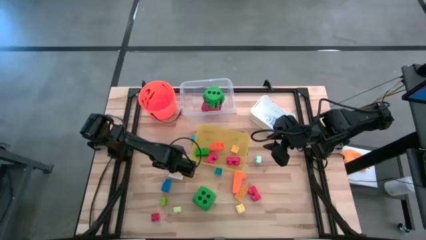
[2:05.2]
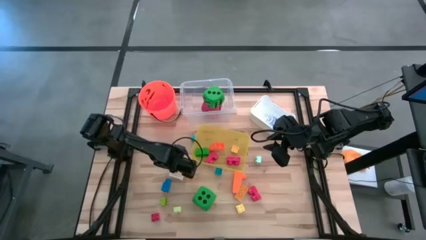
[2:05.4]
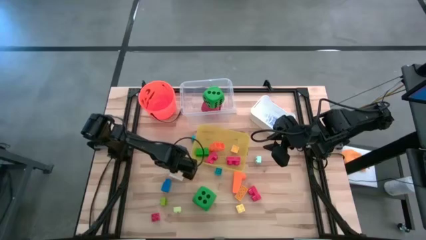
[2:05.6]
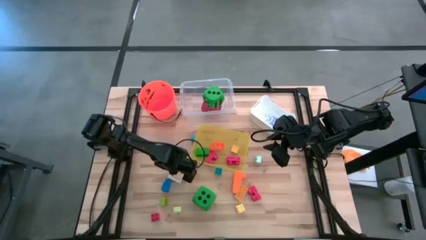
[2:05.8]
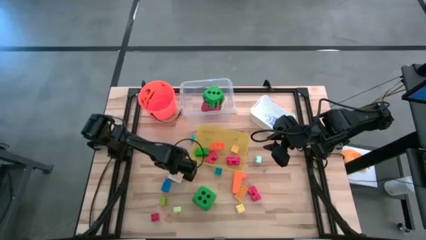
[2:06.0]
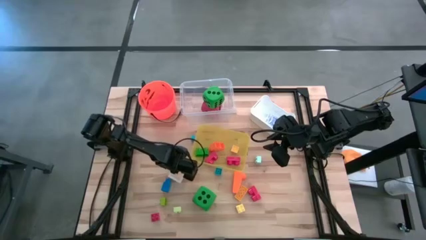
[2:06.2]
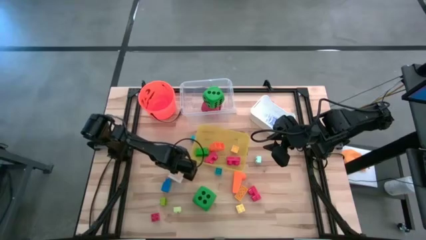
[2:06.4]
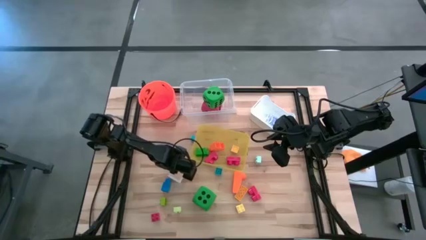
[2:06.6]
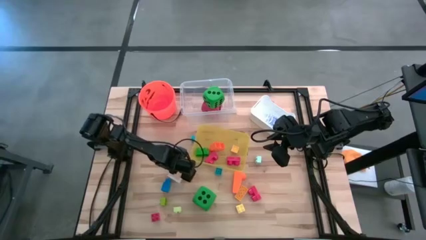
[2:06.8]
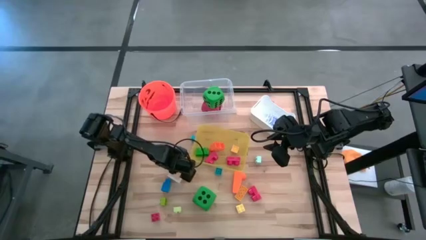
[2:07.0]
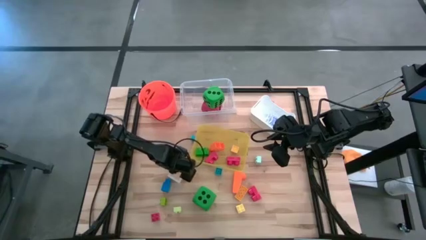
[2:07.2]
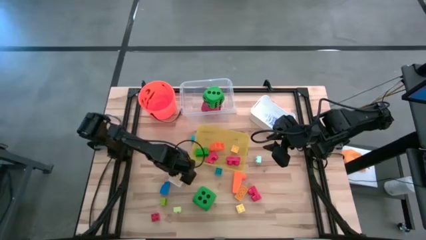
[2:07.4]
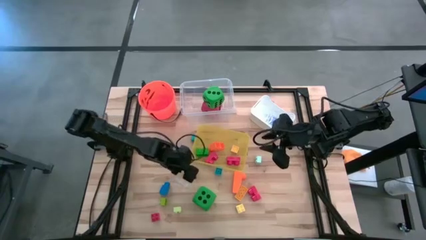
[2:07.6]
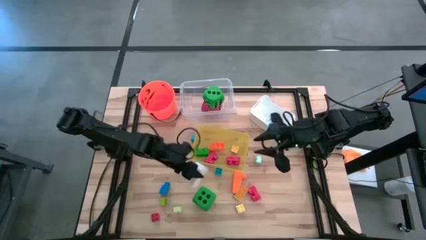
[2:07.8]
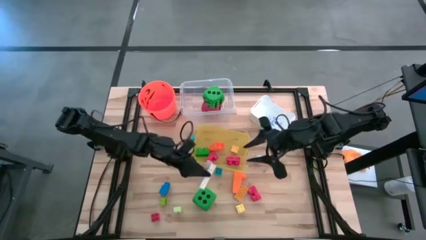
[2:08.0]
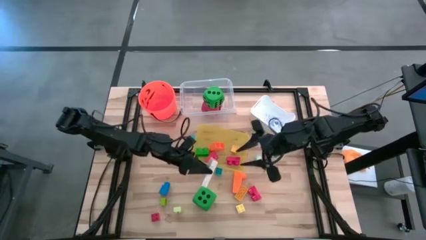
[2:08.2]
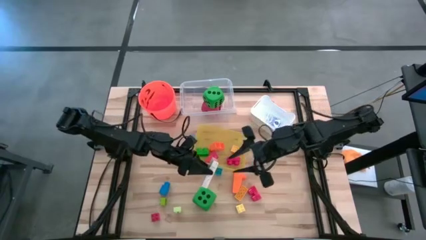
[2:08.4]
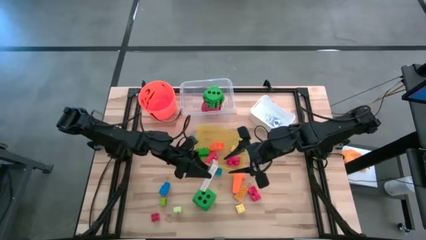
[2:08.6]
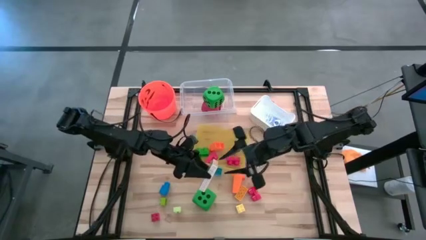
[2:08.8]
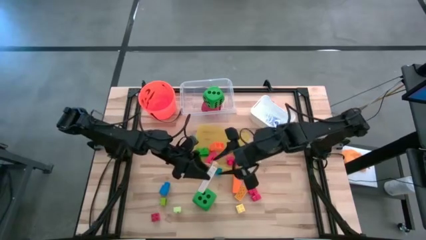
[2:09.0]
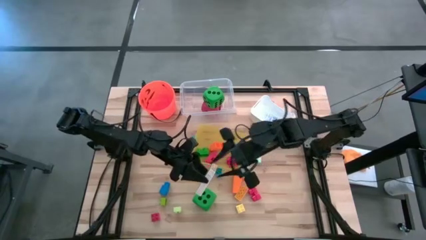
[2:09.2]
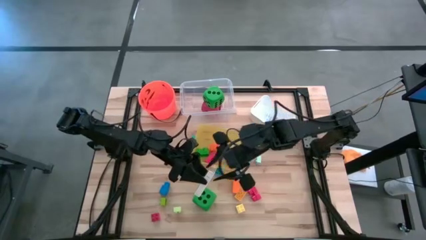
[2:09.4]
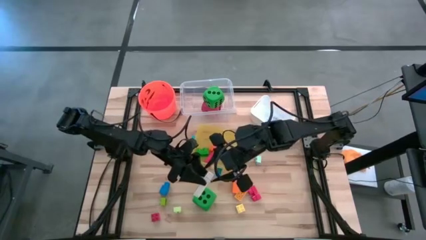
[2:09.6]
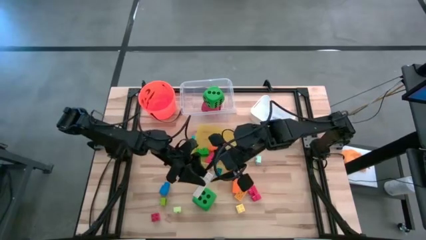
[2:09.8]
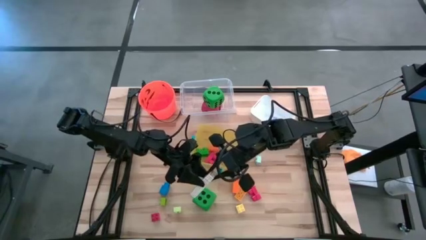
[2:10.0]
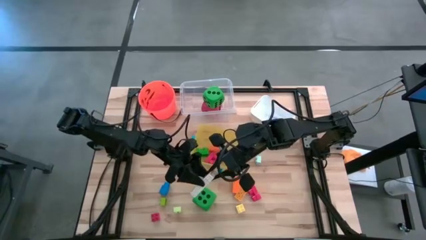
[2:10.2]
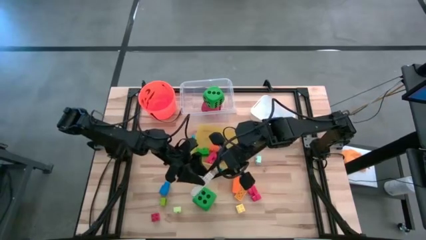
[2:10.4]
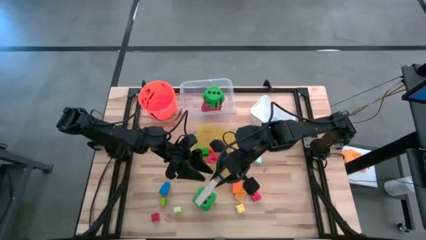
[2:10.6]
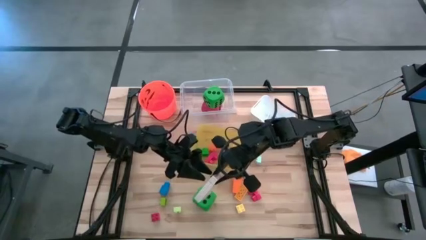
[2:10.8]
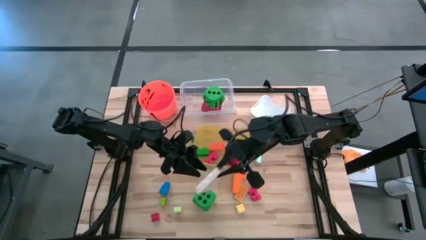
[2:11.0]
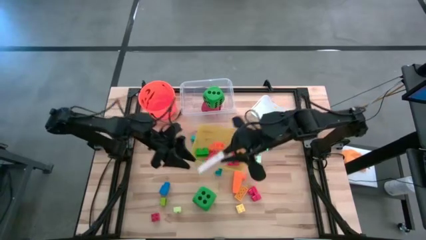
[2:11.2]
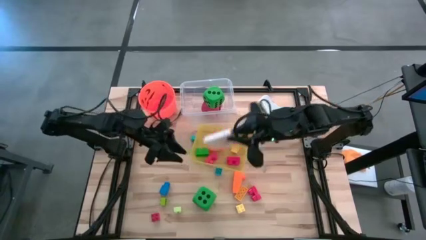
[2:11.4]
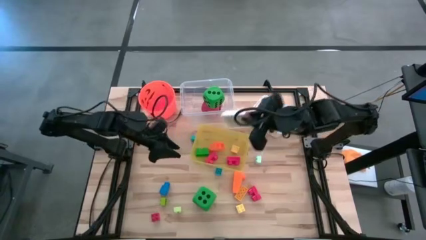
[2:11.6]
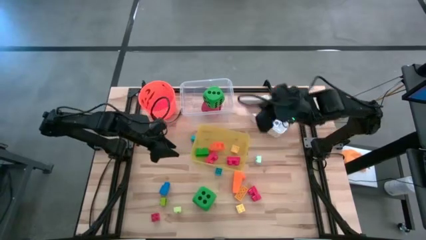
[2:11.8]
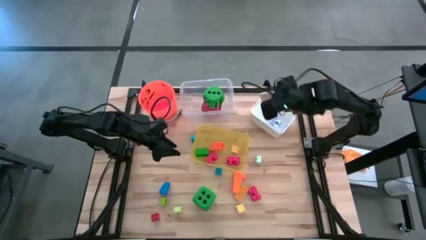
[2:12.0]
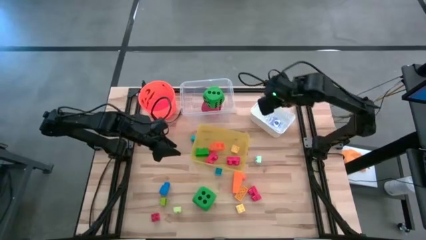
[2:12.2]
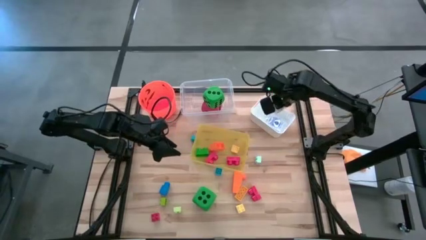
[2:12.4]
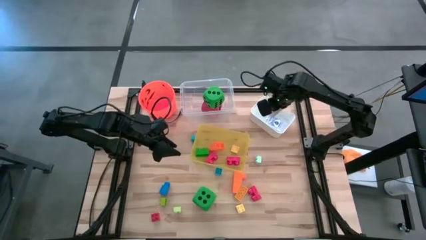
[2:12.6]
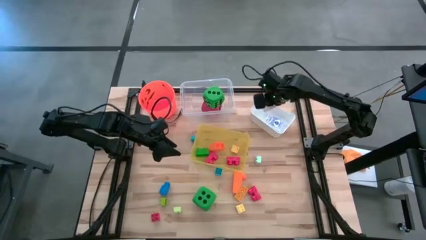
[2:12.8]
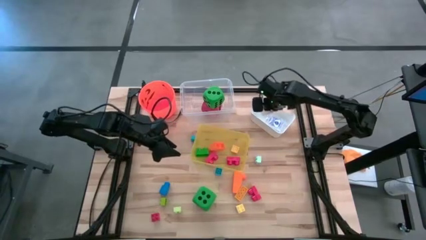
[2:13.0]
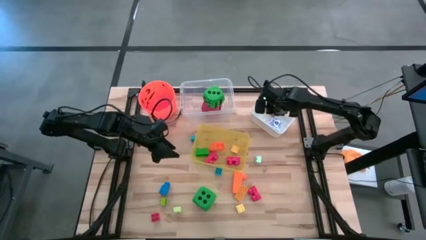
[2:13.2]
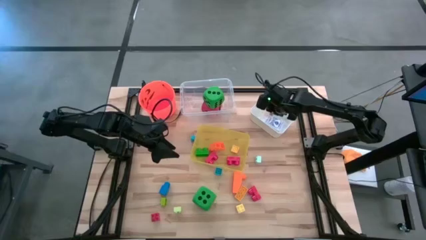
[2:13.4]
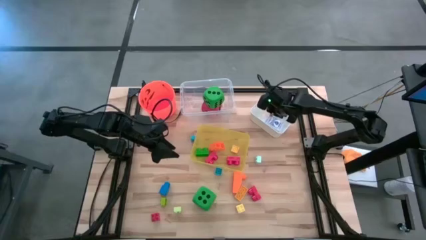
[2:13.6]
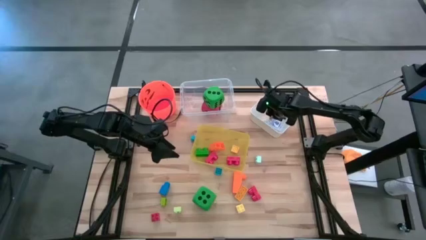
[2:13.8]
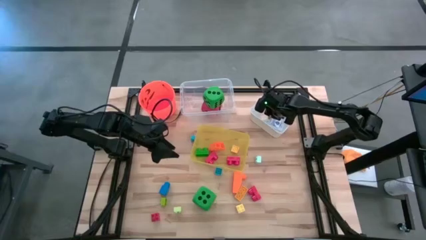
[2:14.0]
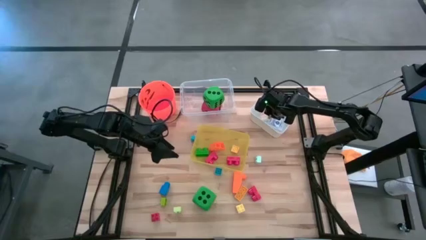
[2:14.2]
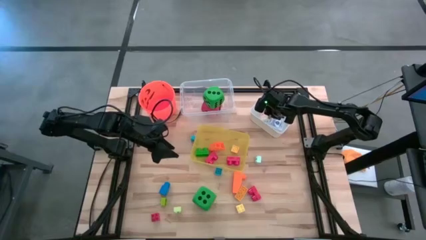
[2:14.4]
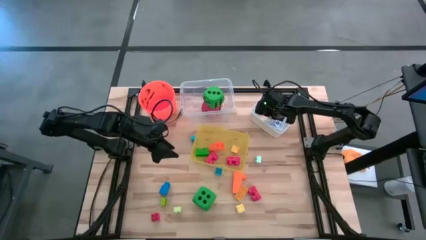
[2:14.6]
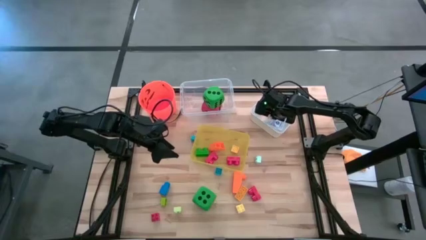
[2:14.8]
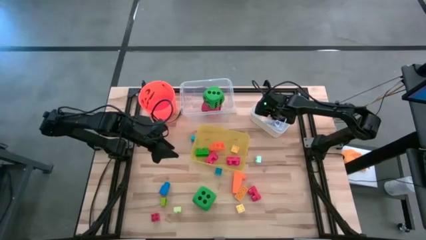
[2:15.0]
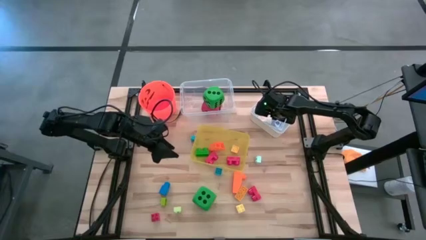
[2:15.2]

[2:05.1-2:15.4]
Task: Pick & Place Toys
Put the yellow game card into the white bin

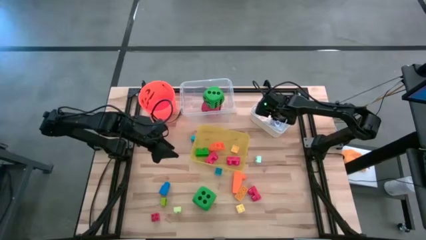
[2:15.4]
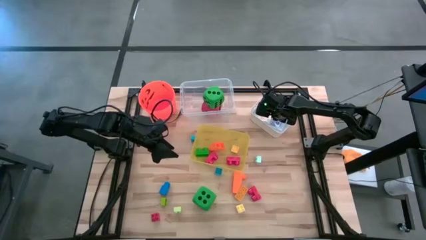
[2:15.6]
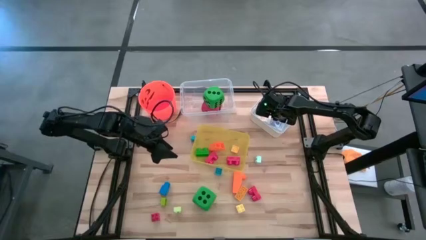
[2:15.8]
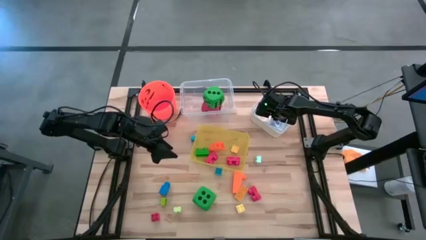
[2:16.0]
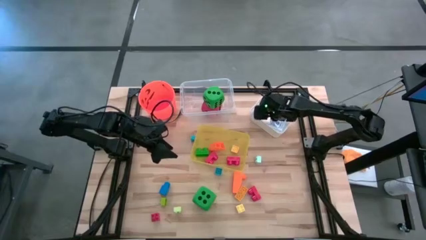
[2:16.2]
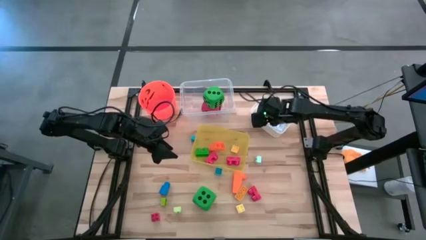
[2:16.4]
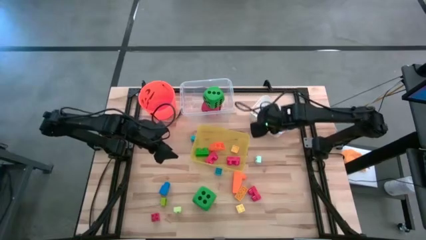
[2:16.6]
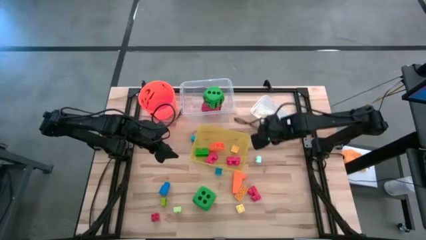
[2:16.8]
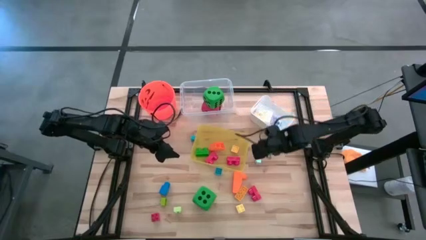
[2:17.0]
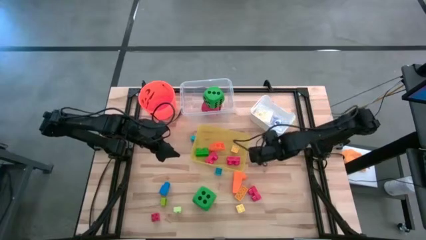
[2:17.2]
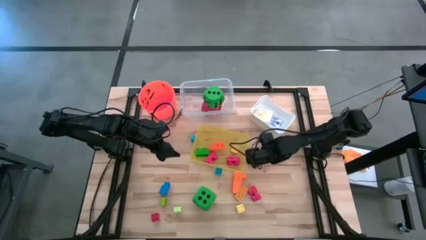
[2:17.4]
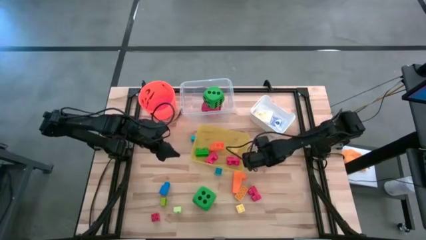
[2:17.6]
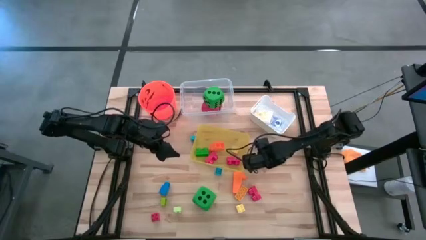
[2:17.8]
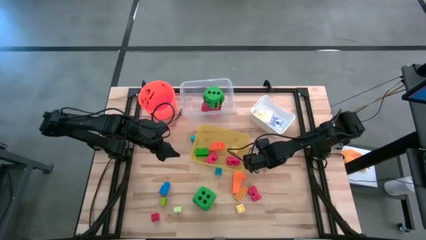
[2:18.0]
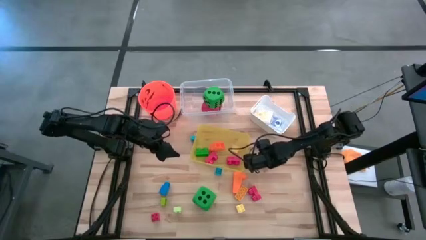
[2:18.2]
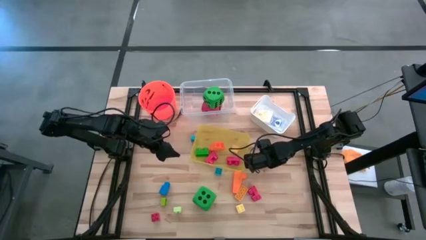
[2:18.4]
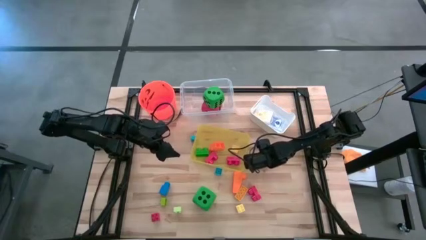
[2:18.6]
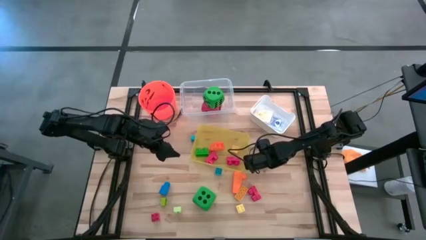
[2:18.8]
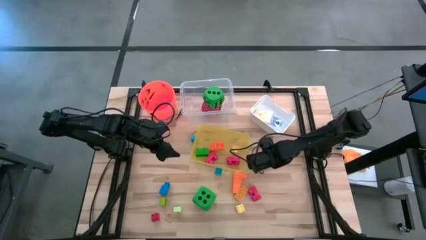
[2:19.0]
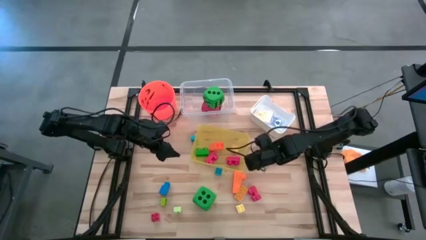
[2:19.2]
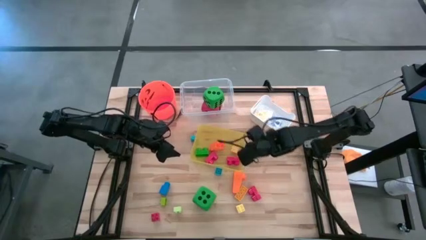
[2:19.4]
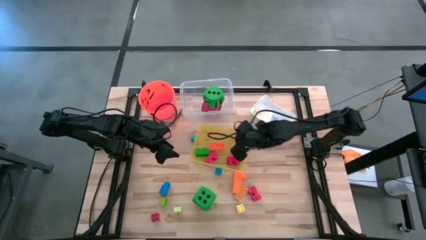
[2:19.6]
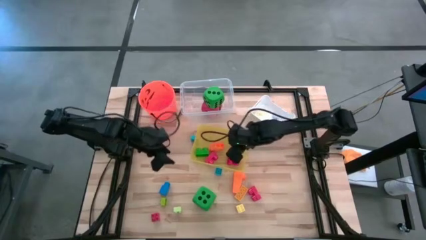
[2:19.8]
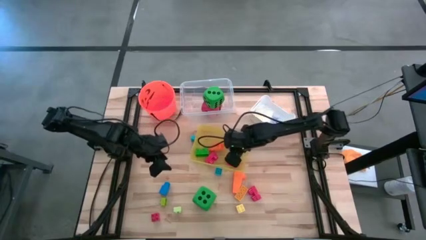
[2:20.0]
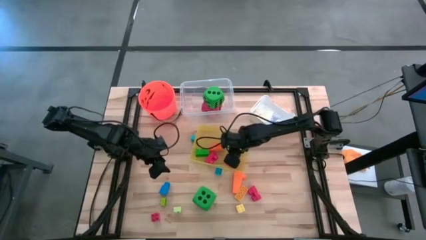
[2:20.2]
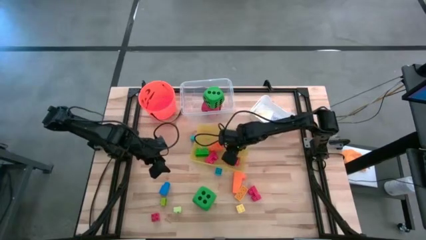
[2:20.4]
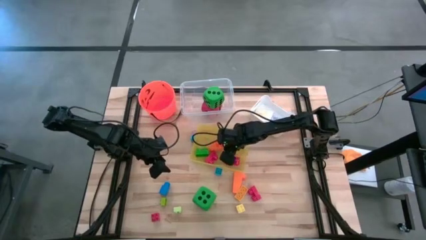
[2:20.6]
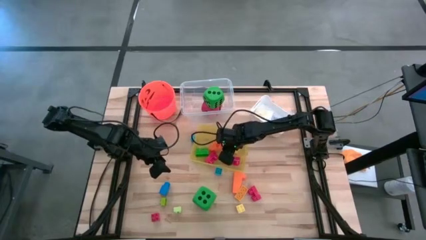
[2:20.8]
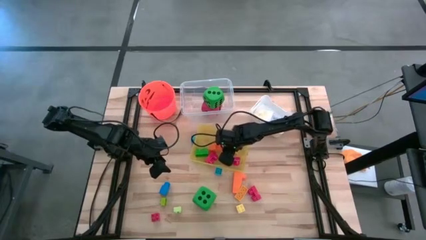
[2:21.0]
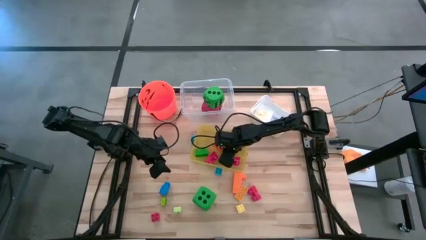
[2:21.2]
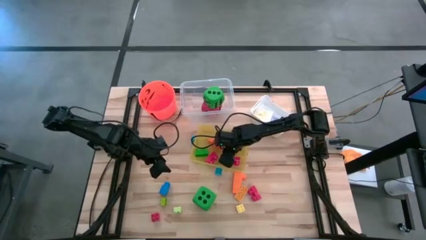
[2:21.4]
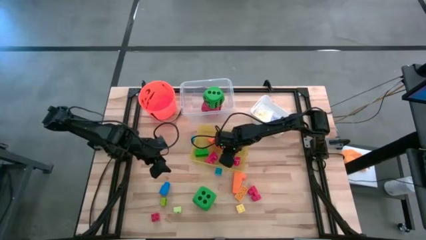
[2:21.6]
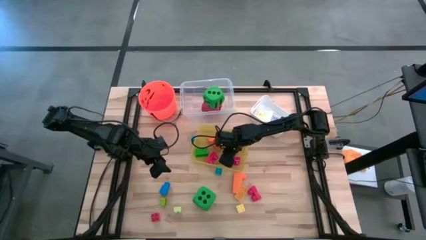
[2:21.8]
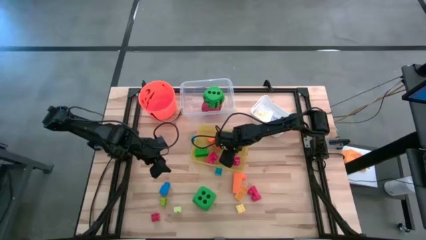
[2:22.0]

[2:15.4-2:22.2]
Put the light blue game piece into the yellow bin

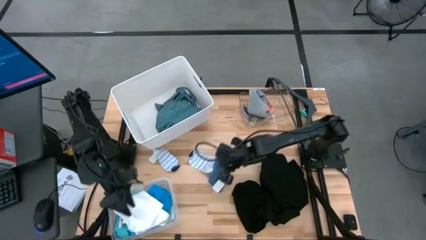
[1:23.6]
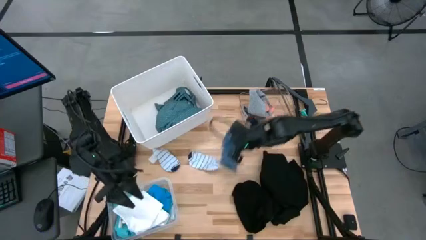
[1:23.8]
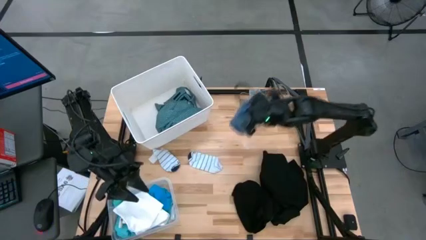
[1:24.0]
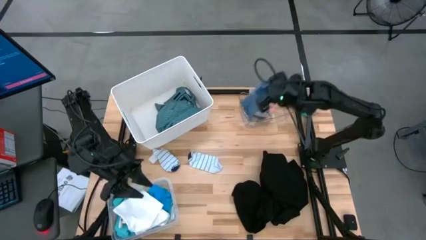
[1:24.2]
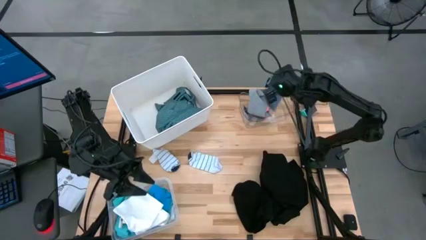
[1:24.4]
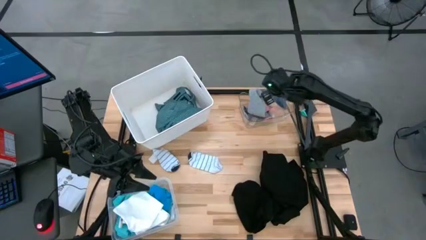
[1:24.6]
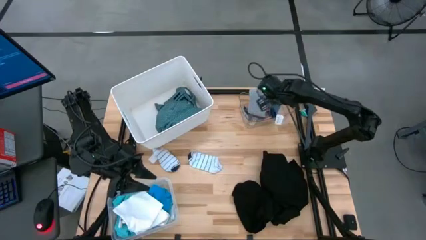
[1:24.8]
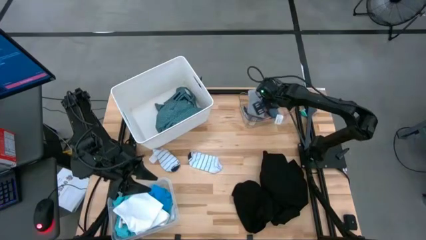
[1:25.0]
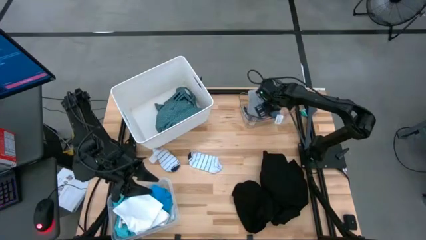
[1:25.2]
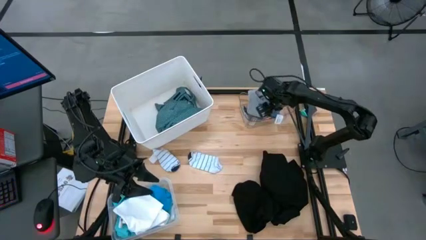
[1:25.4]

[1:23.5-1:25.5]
Task: Pick & Place Cloths
Put the blue sock into the top transparent bin
